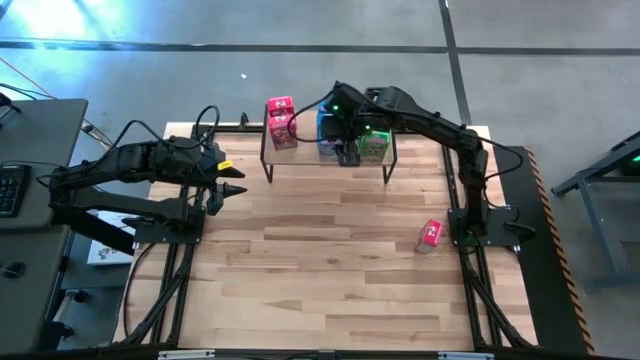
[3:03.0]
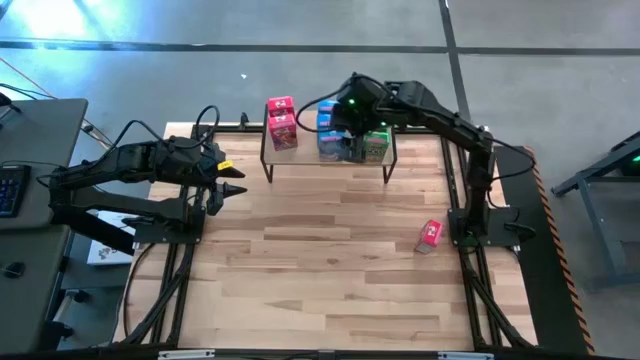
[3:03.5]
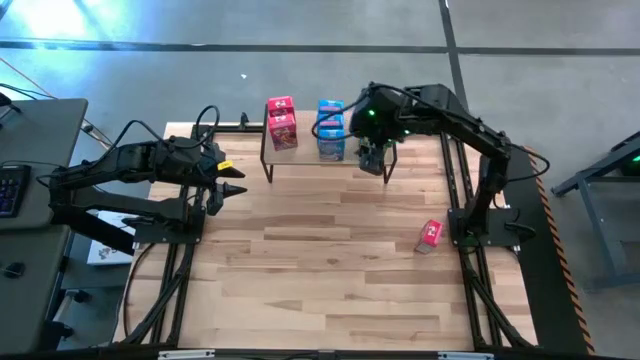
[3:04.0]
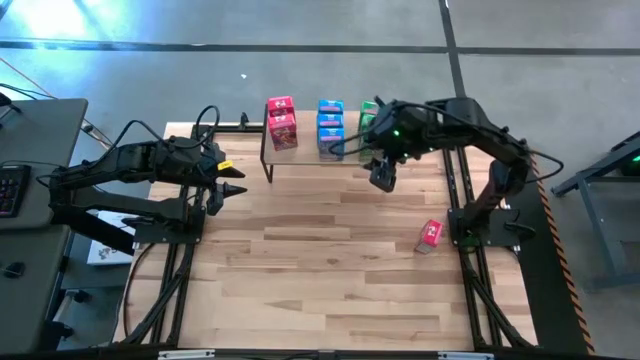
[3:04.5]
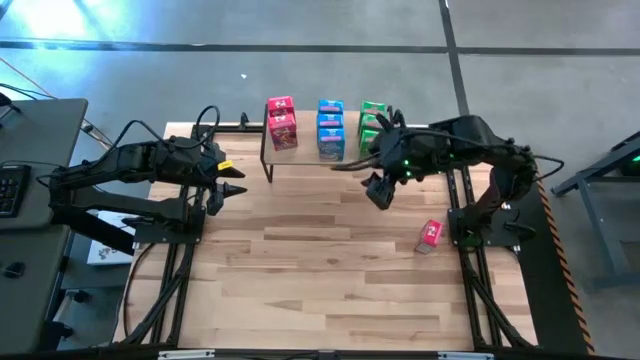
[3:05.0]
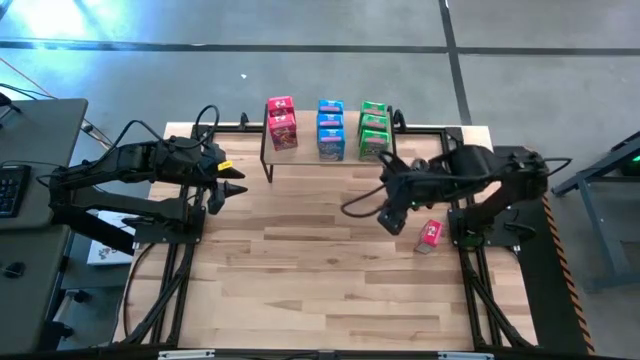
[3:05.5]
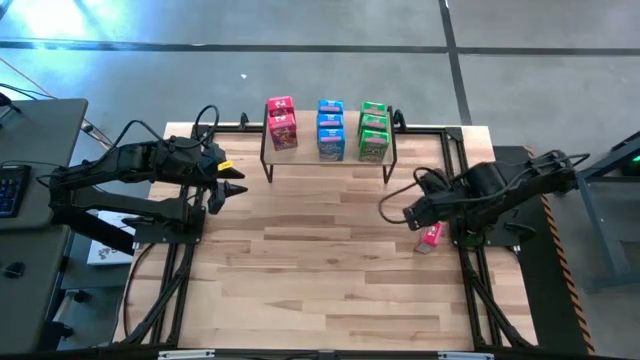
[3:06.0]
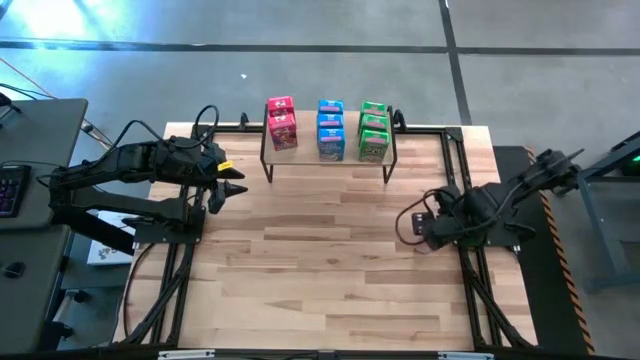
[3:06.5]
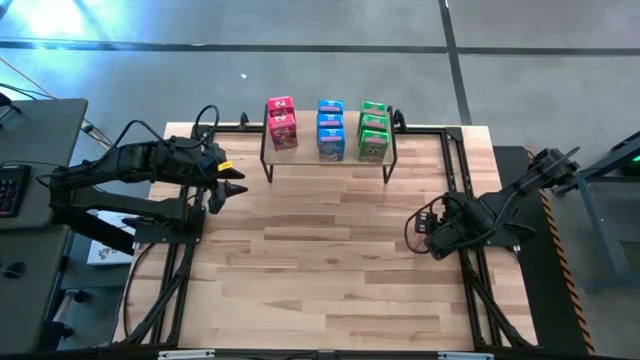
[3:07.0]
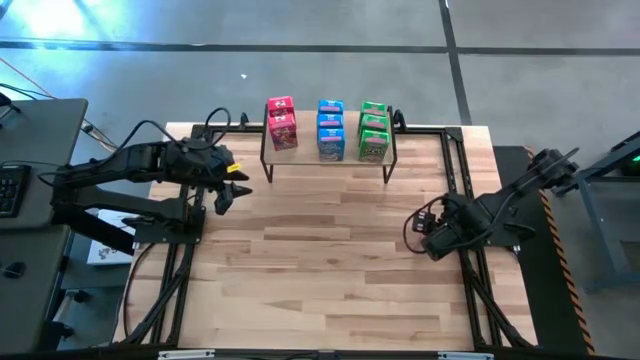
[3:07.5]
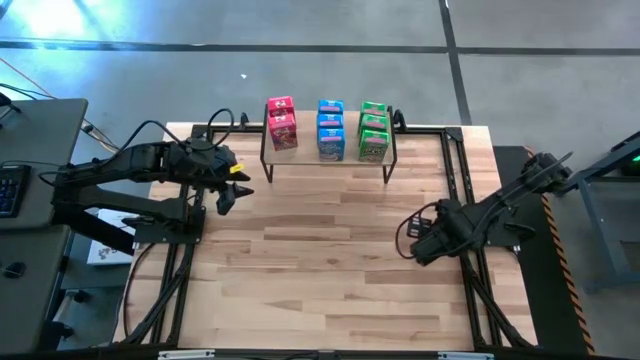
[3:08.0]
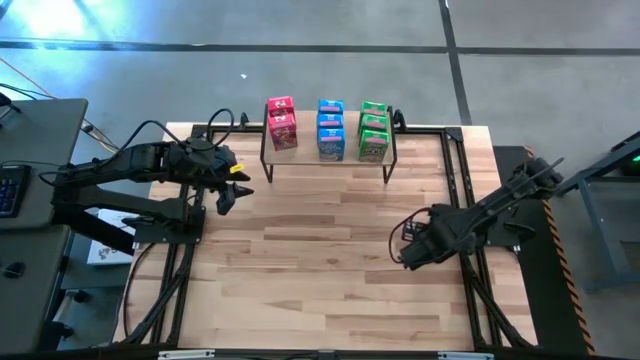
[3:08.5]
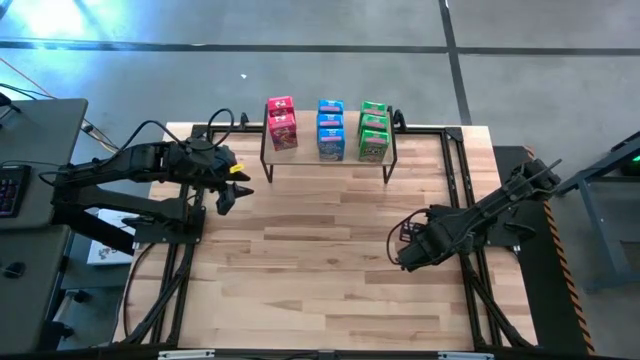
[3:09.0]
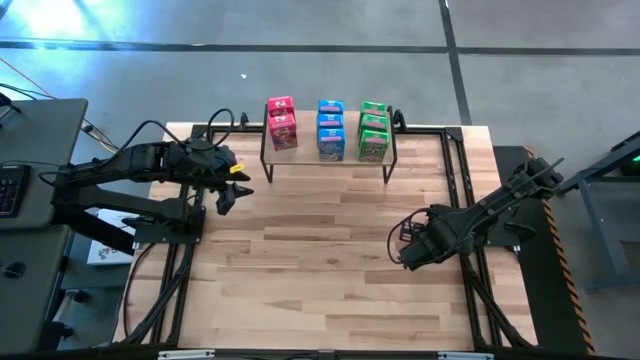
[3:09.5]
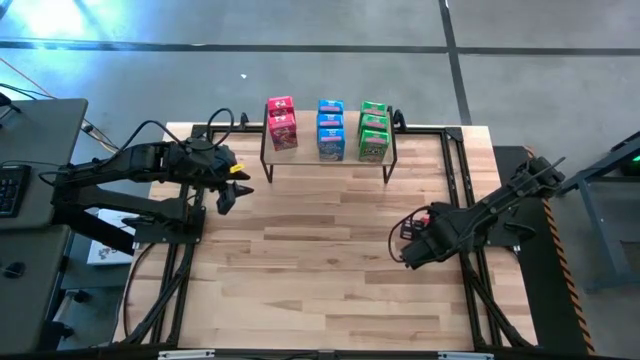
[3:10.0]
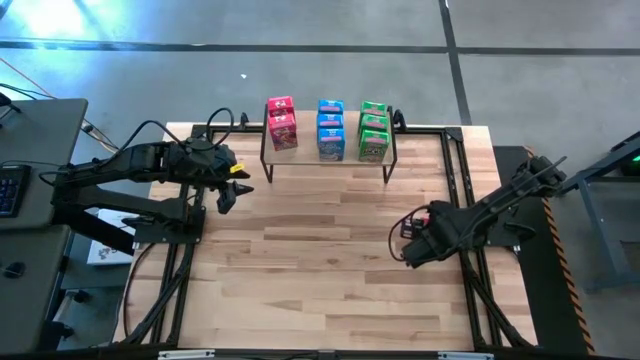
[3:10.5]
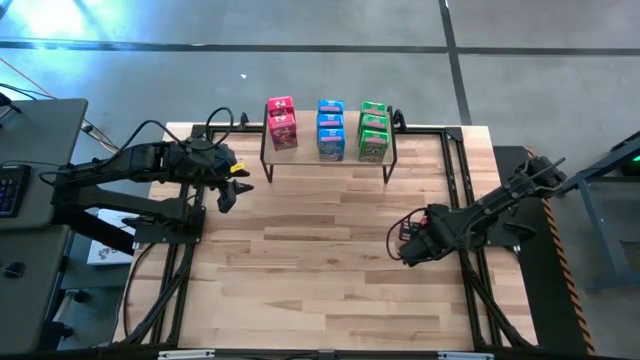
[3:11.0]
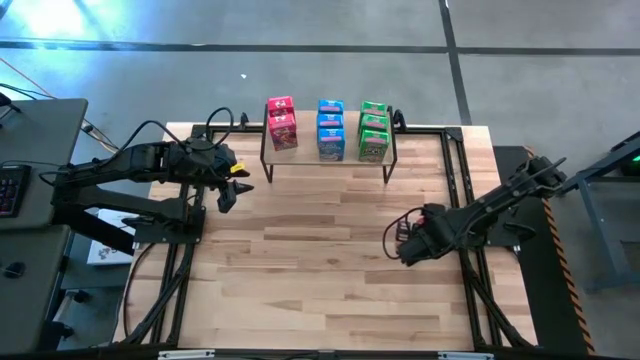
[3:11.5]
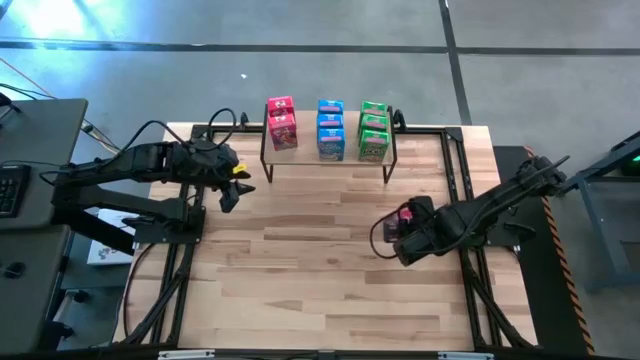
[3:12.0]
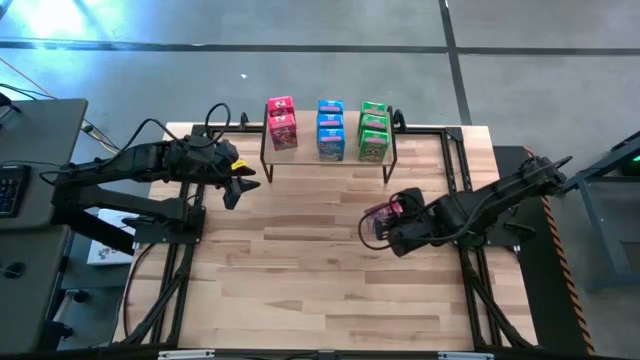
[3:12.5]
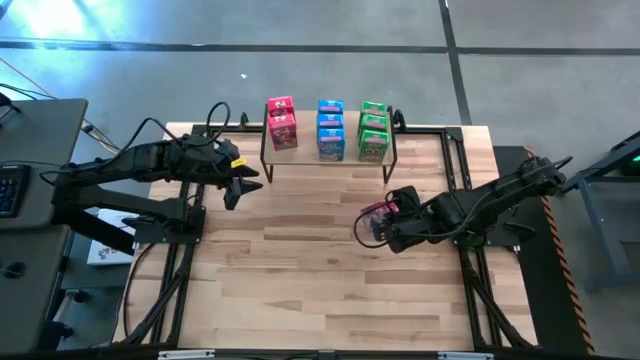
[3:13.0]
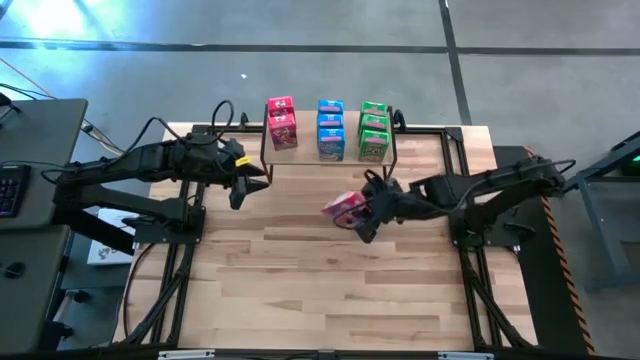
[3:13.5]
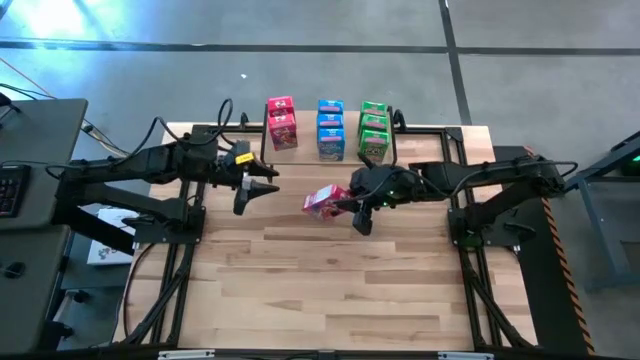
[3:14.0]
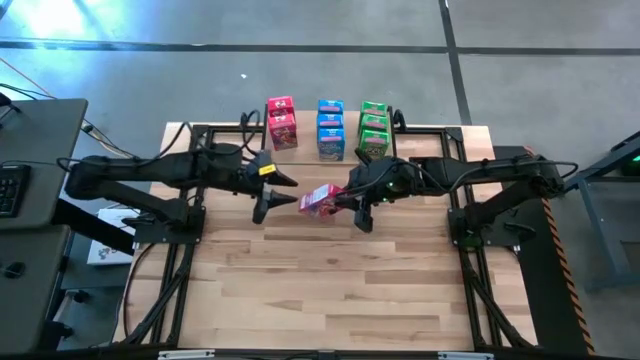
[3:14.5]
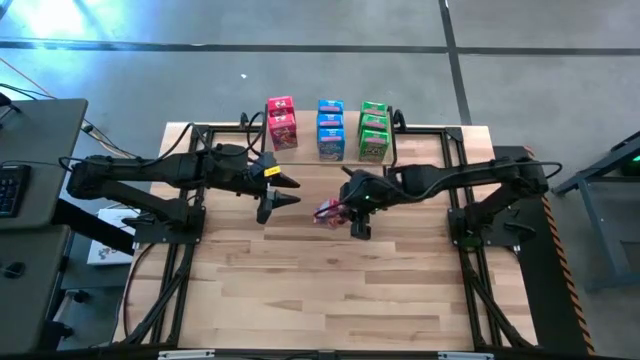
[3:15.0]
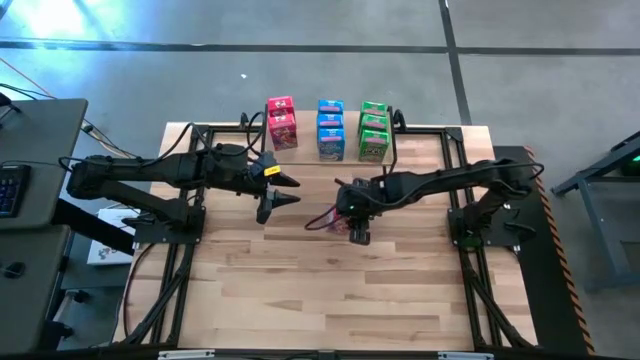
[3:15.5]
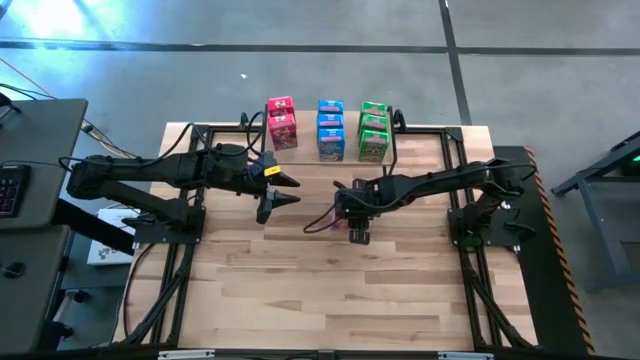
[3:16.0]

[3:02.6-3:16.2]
Task: Stack cereal on shelf
Put the red cereal box on the center of the table aligned with the other red cereal boxes

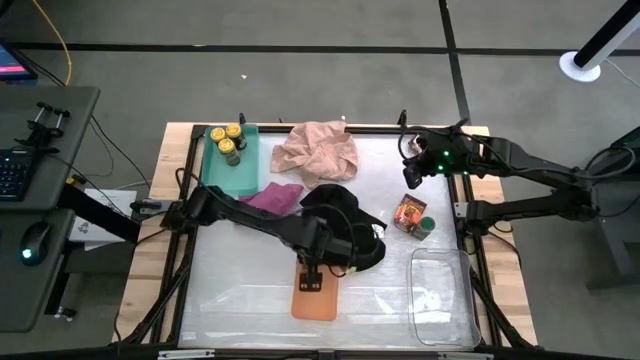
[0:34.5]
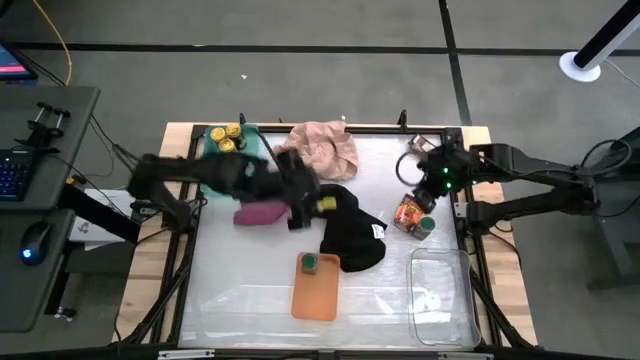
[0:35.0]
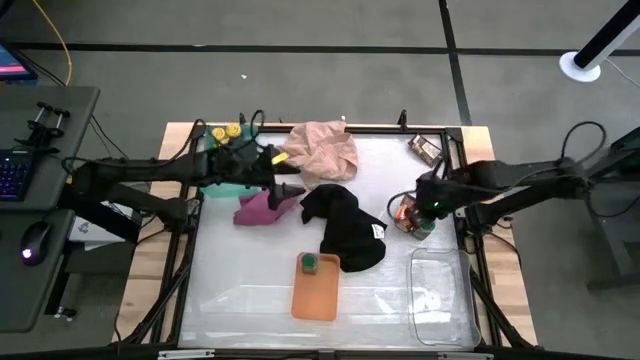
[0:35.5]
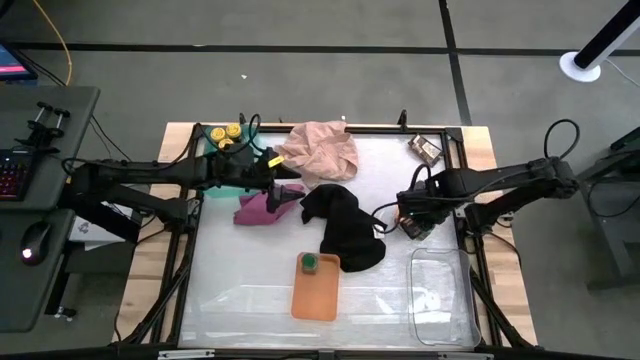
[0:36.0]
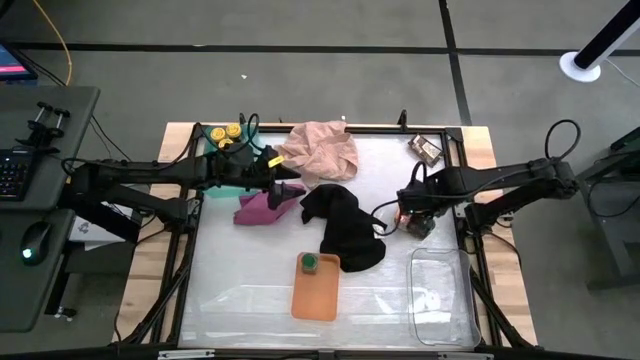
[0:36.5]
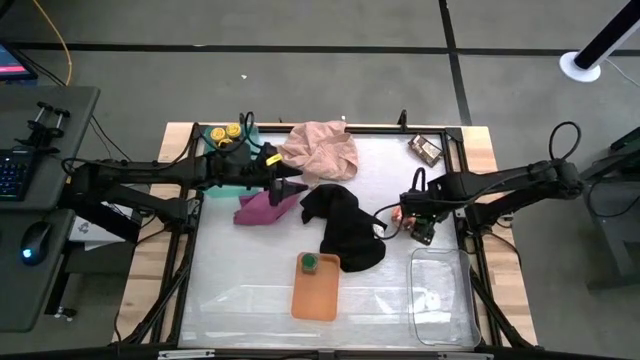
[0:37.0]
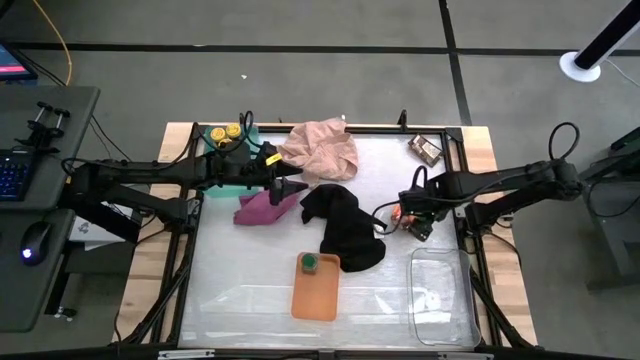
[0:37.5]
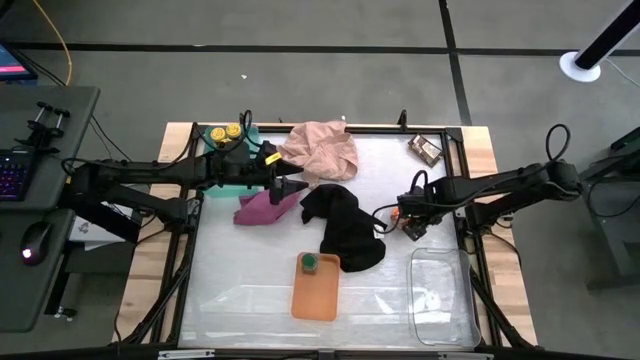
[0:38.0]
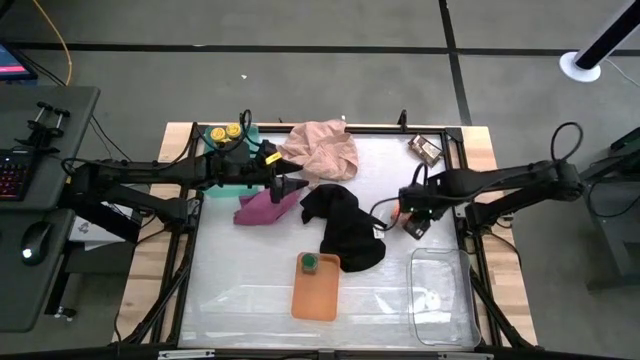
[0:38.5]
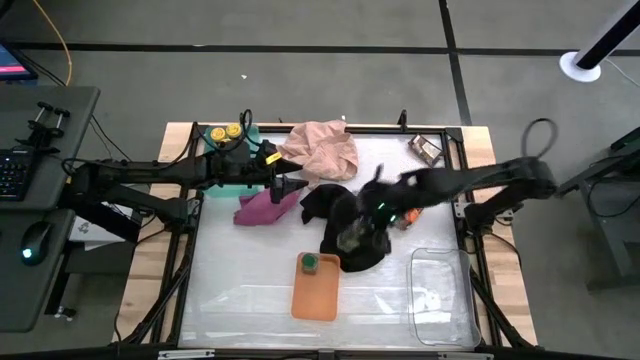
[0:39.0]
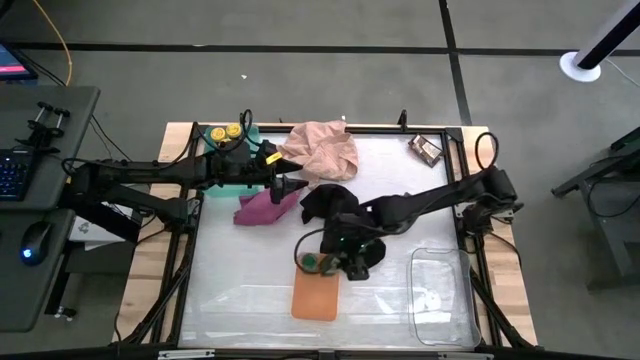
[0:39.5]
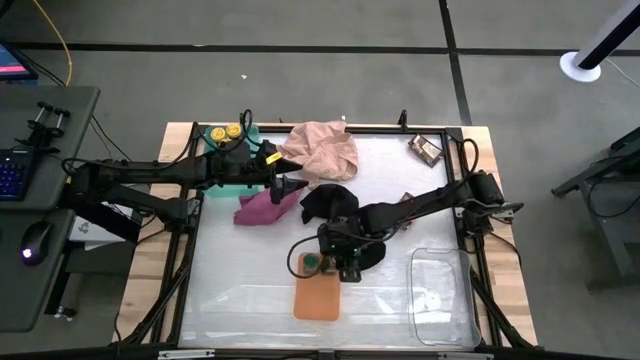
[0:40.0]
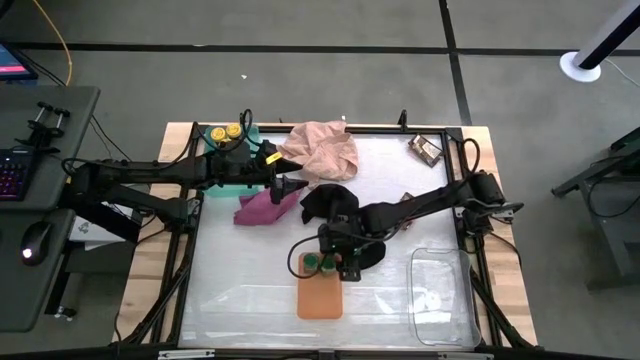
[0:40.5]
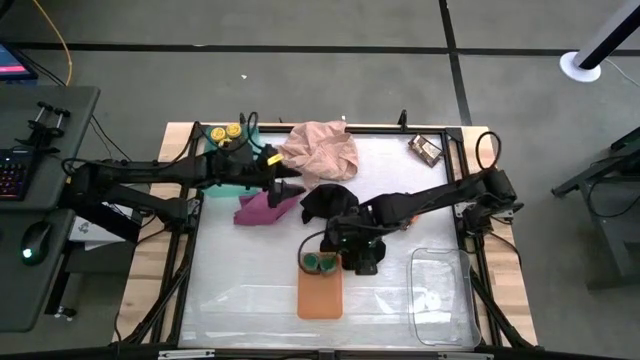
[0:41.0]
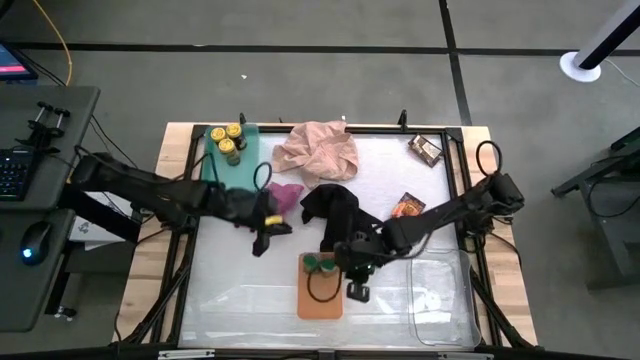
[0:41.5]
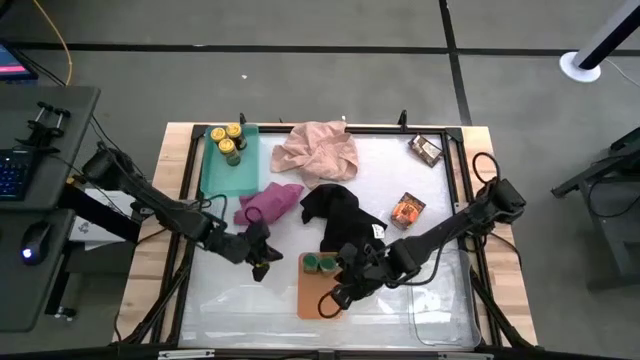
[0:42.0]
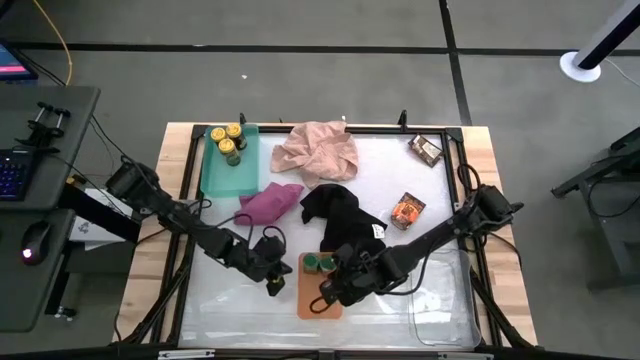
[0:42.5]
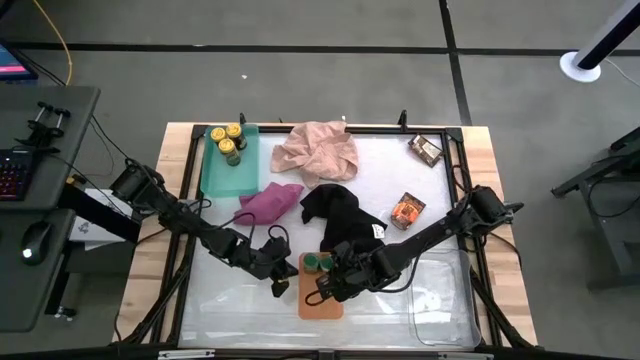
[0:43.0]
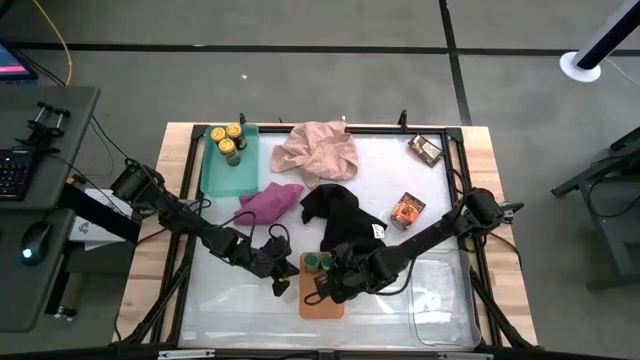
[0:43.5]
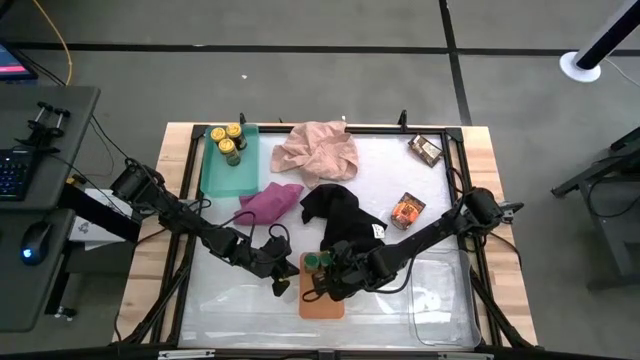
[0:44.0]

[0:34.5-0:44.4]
Task: Sort spices by type
Put the green seasoning bottle into the orange bin
